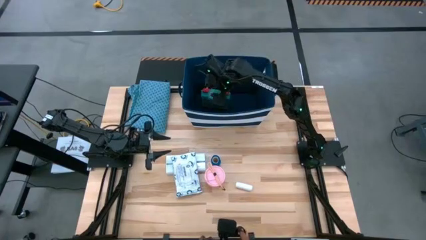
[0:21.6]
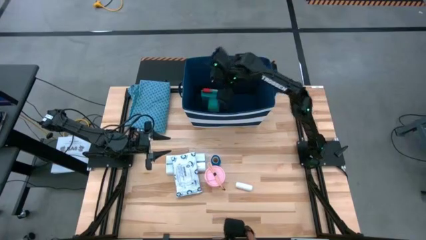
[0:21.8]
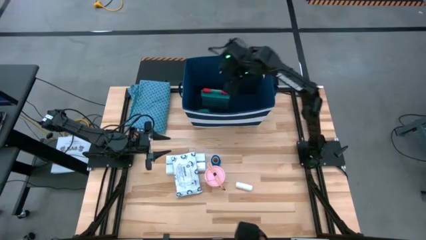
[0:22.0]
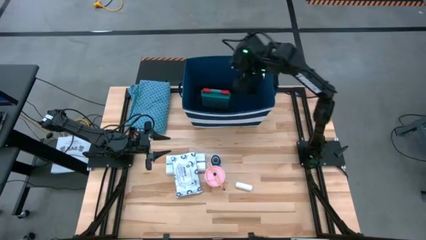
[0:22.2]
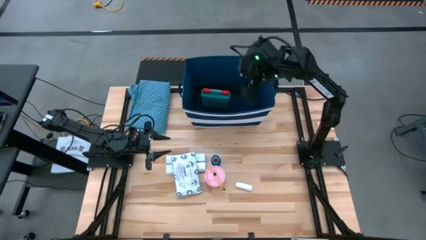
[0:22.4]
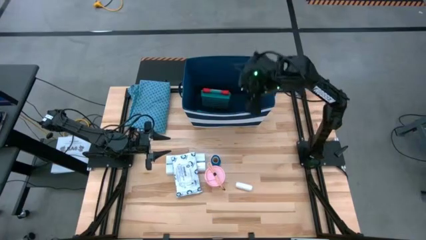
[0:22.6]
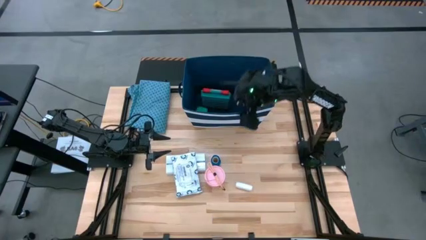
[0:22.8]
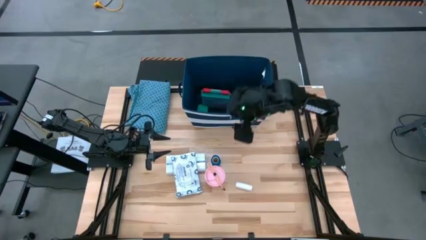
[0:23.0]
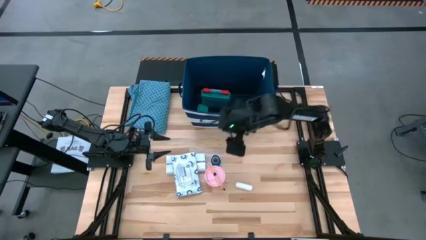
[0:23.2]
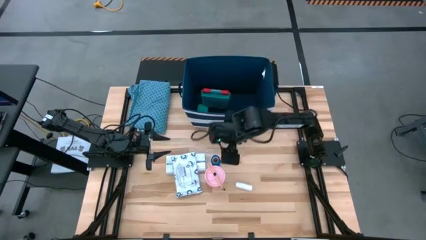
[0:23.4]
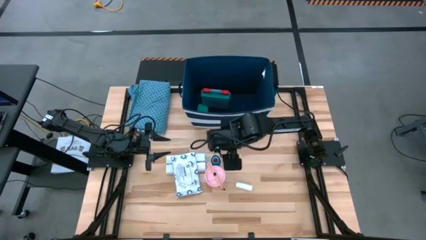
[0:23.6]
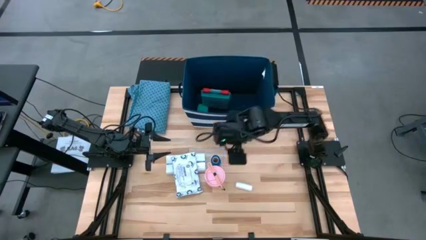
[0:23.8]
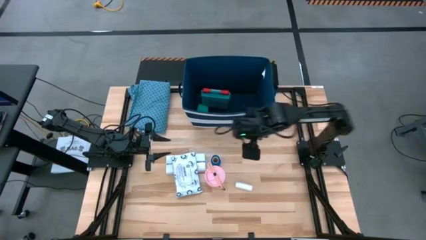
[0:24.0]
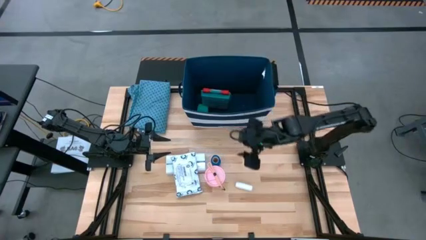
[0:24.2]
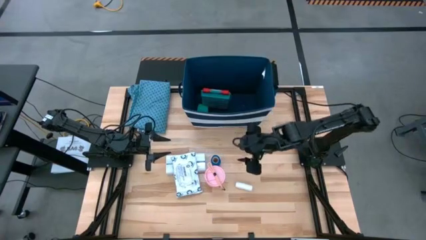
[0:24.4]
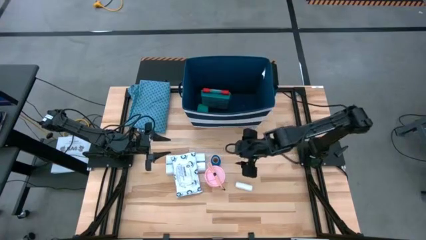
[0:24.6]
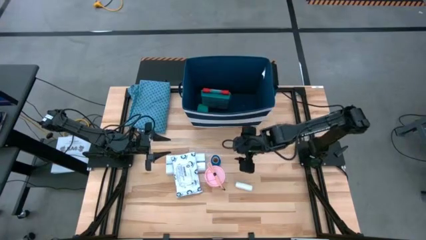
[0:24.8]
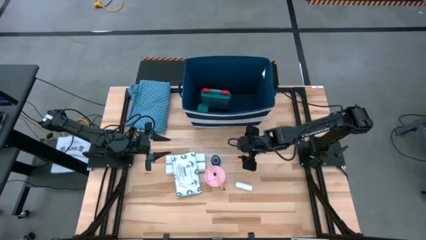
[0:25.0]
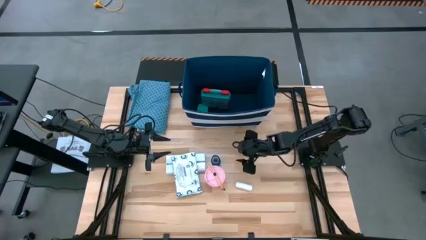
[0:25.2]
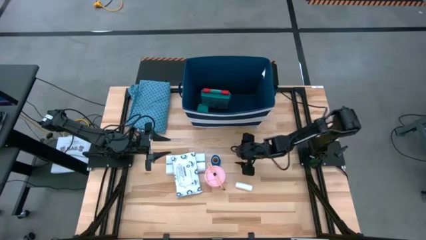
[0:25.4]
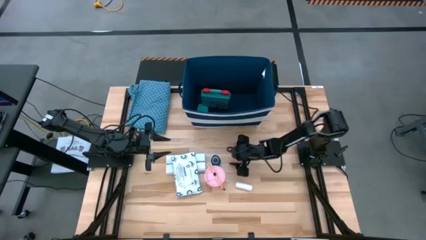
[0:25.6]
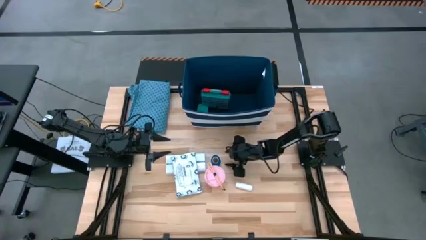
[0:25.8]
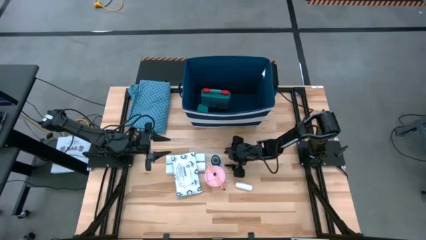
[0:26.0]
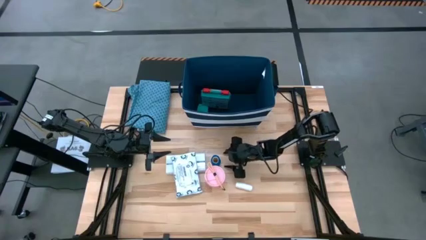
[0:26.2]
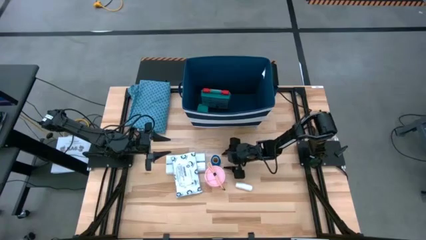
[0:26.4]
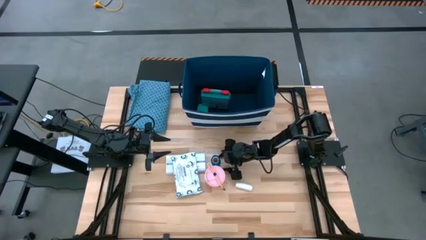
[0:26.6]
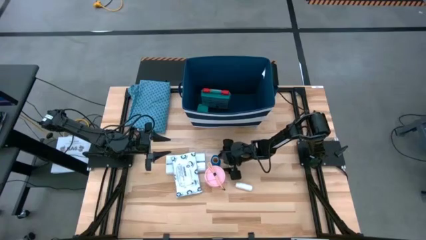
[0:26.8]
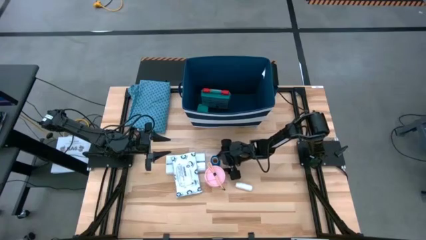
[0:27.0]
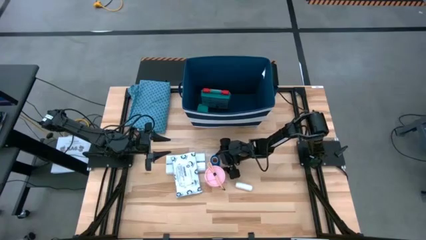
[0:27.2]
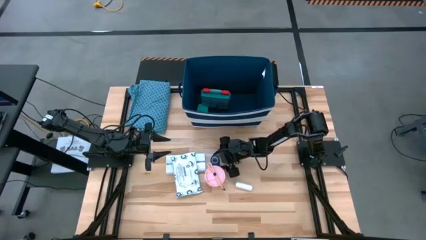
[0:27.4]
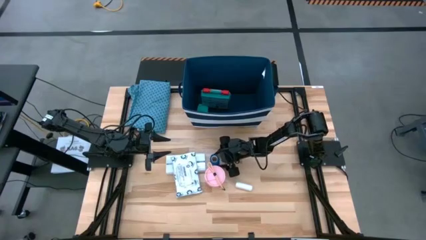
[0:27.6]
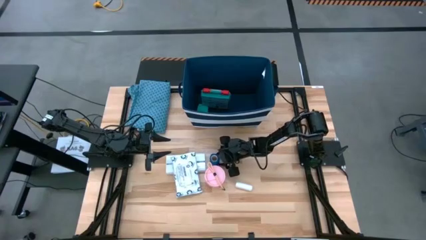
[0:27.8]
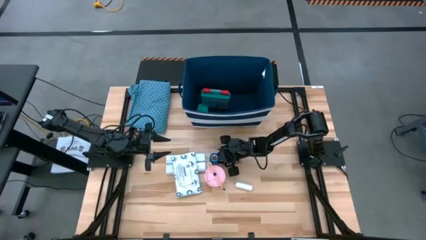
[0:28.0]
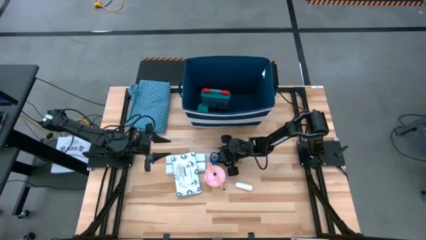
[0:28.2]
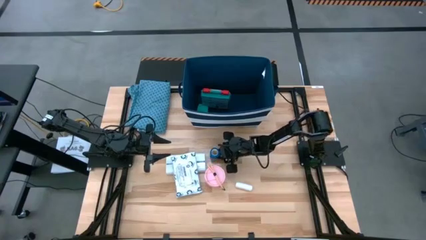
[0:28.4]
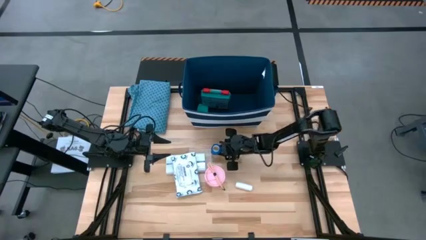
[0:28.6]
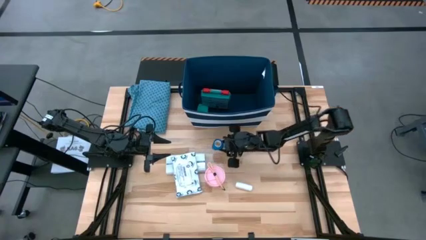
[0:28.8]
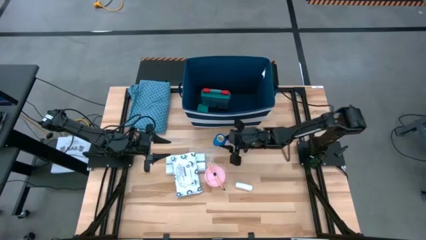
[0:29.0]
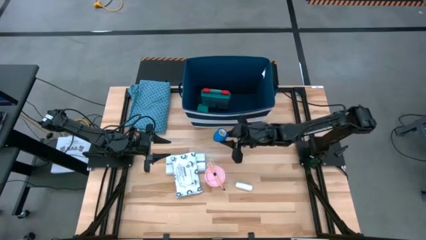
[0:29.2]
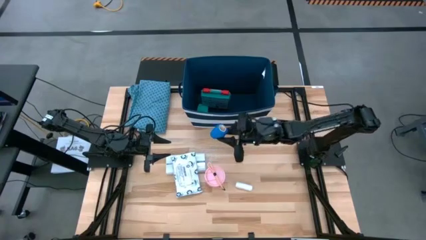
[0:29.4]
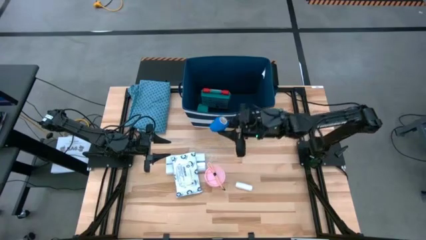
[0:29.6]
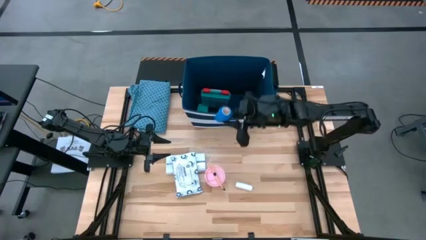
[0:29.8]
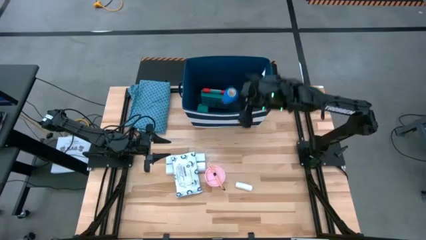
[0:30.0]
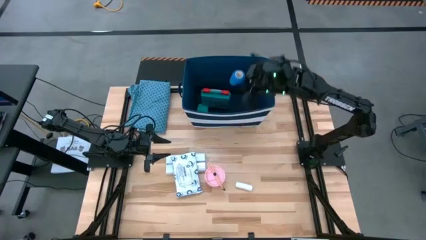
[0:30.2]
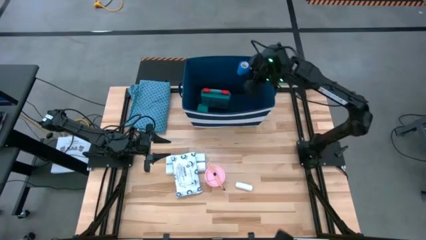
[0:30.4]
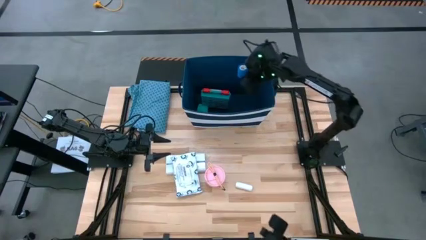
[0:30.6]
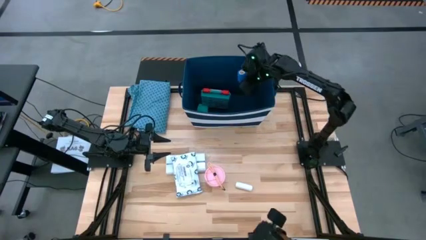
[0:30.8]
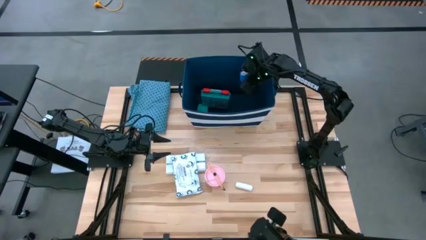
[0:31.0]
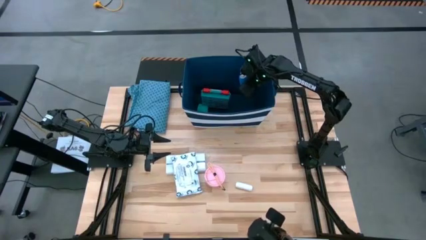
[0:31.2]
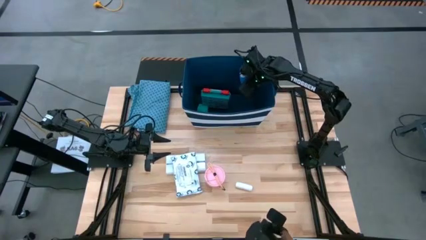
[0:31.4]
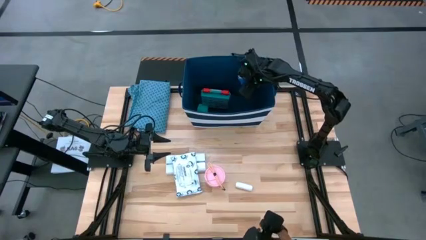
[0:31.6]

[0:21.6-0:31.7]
Task: Pick & place medical supplies in basket/bin
Put the blue bandage into the blue bin

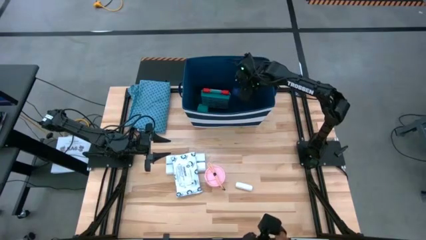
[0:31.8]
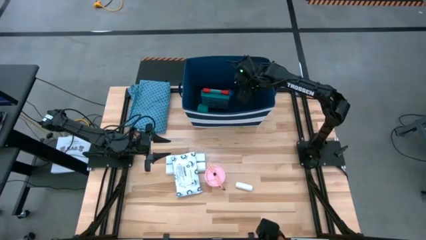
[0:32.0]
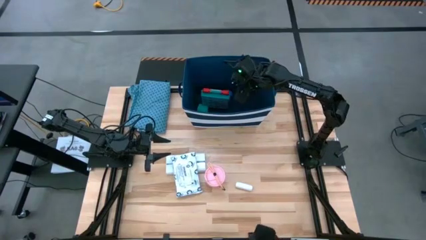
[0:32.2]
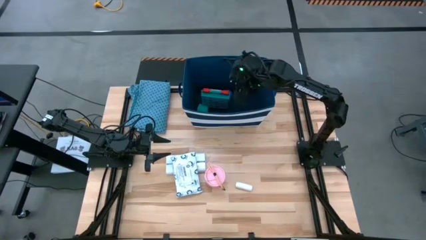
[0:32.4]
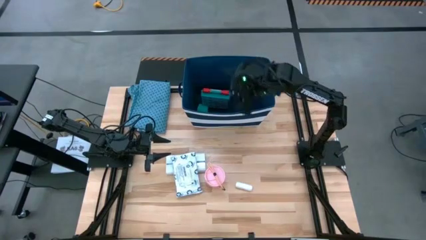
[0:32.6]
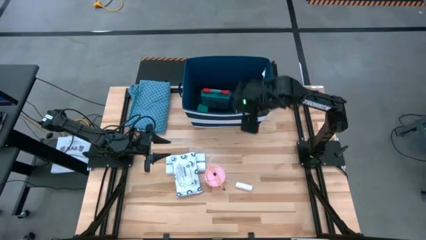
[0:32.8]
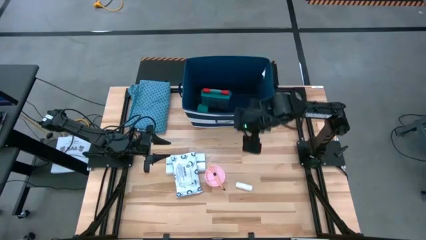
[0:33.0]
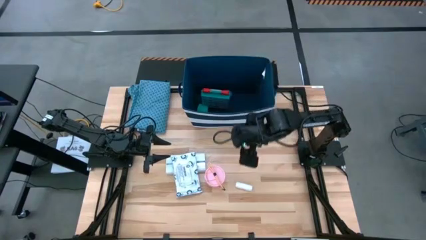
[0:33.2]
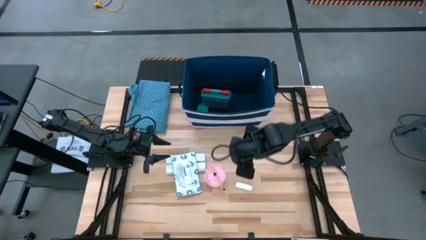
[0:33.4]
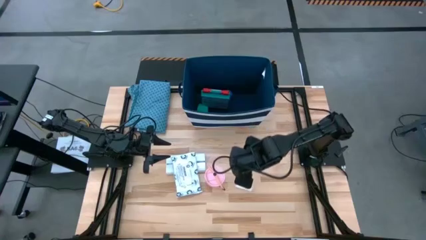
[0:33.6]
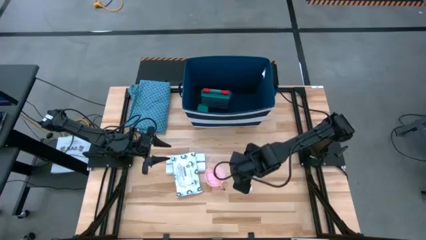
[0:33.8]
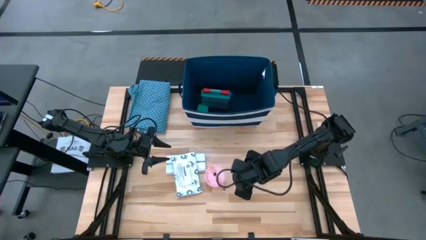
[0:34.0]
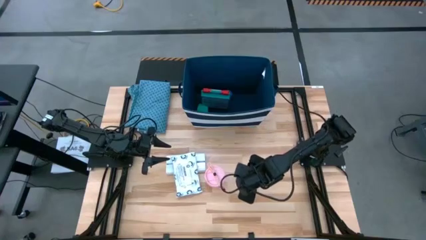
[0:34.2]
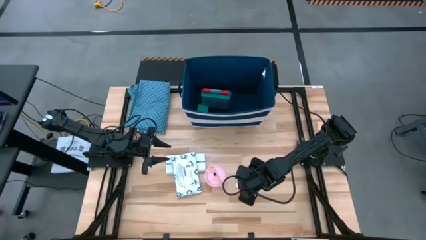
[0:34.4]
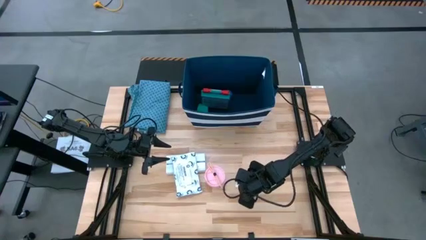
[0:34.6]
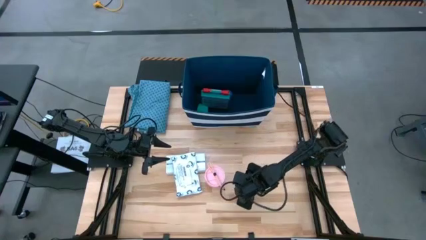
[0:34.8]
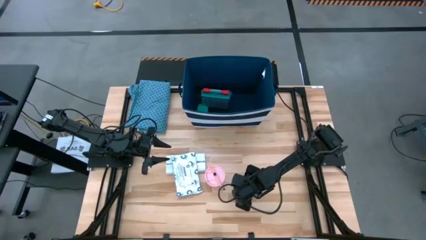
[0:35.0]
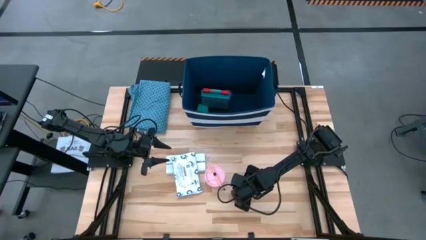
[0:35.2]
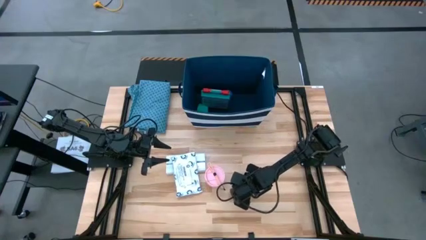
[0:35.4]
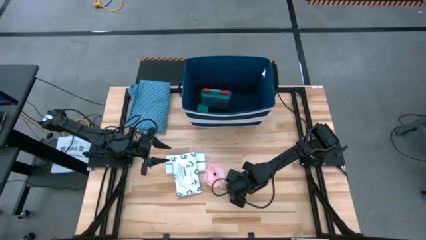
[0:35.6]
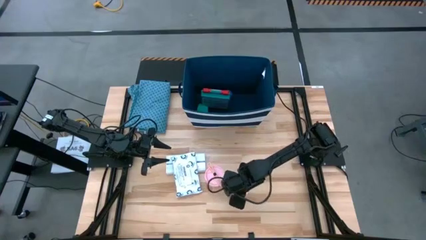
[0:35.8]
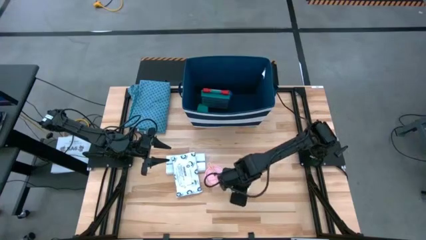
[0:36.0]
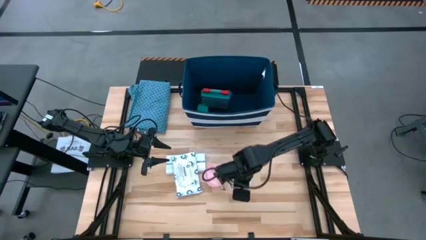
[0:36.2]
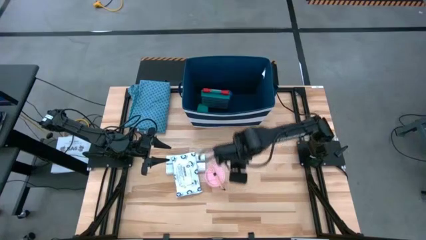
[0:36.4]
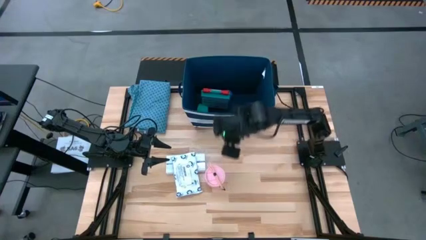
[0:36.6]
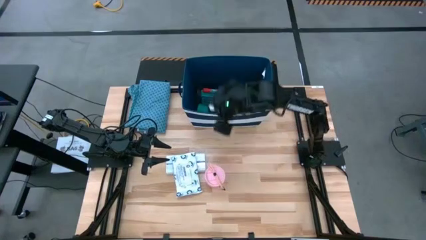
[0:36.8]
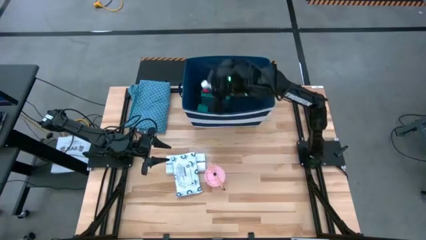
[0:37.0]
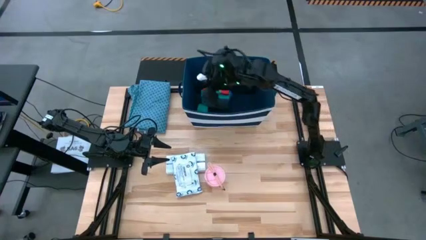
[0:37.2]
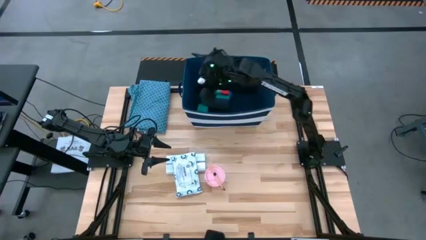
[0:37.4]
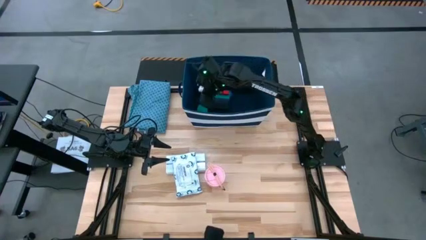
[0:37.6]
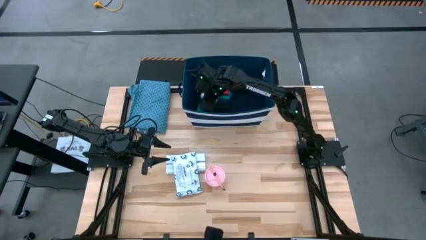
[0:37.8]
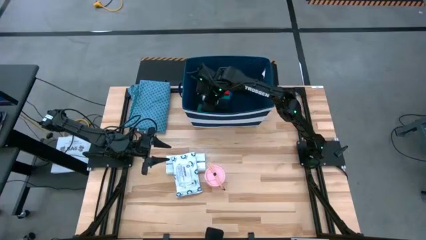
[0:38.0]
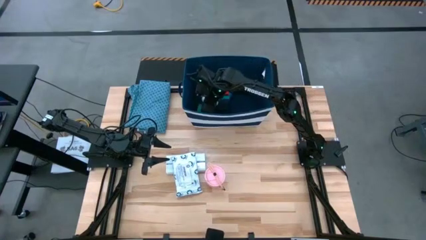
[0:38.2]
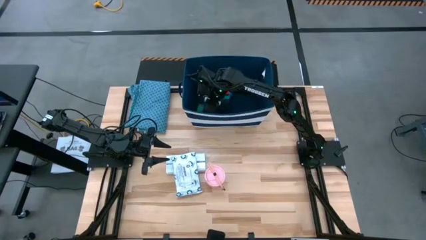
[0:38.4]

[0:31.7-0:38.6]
Put the white bandage into the blue bin
